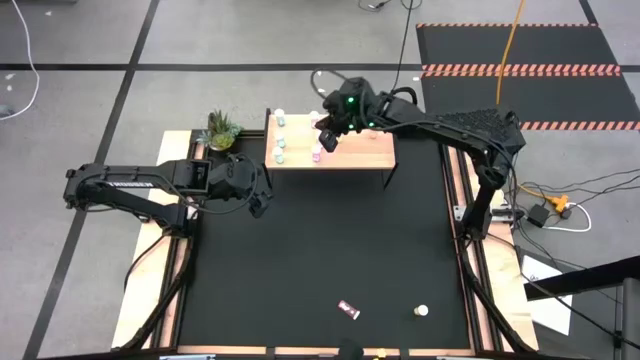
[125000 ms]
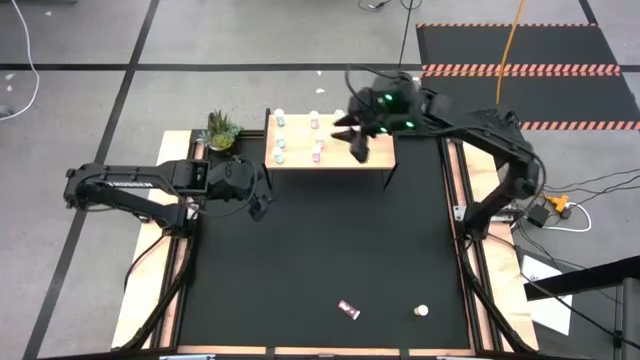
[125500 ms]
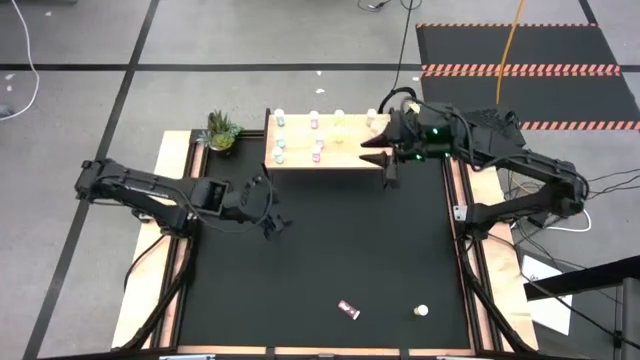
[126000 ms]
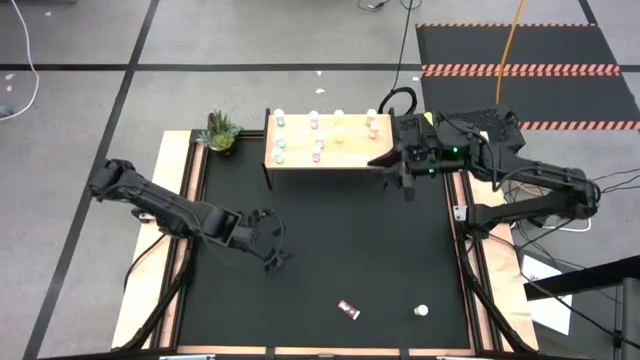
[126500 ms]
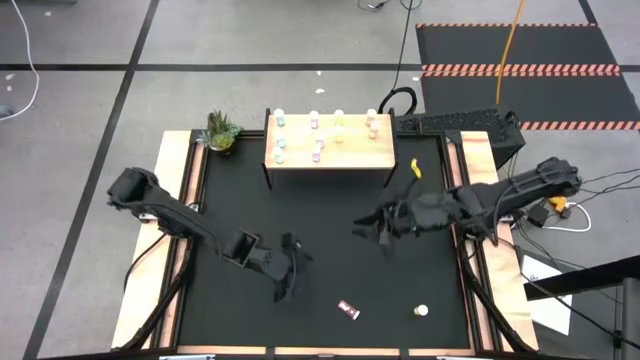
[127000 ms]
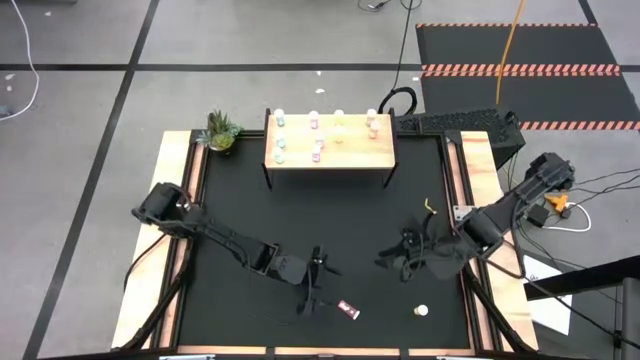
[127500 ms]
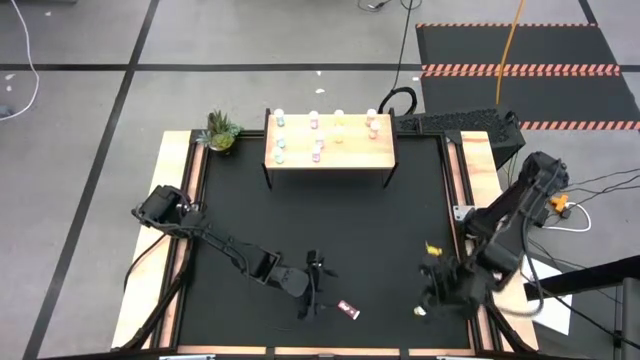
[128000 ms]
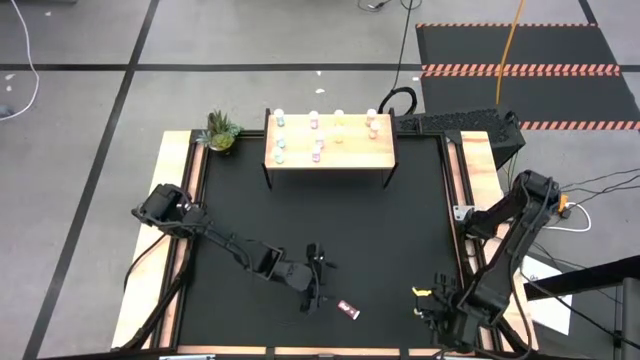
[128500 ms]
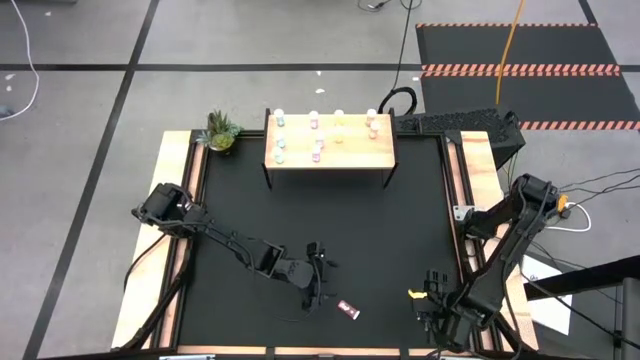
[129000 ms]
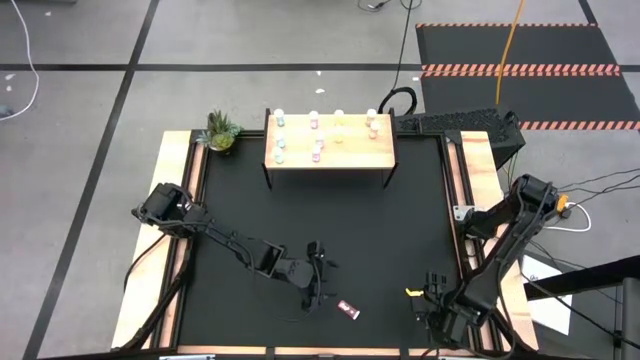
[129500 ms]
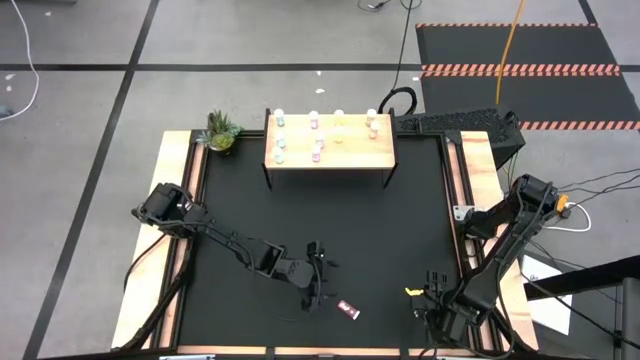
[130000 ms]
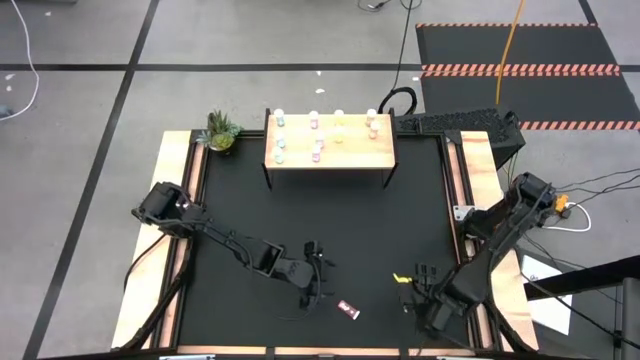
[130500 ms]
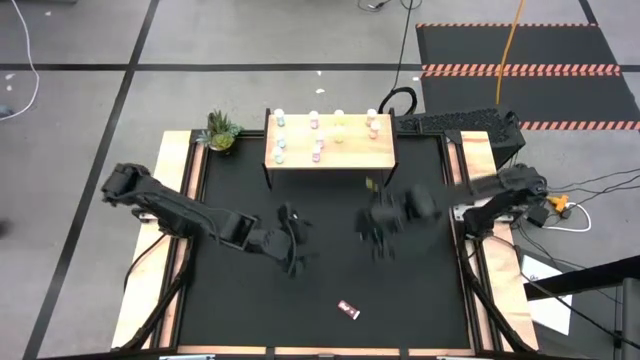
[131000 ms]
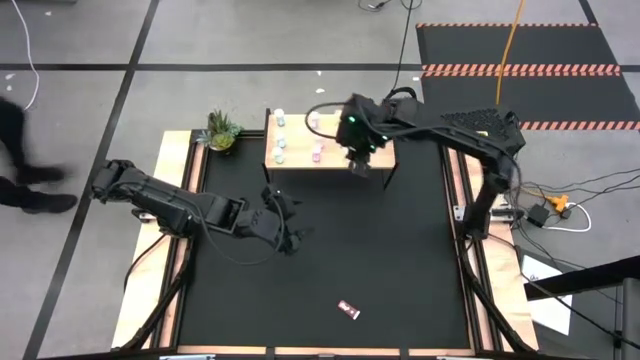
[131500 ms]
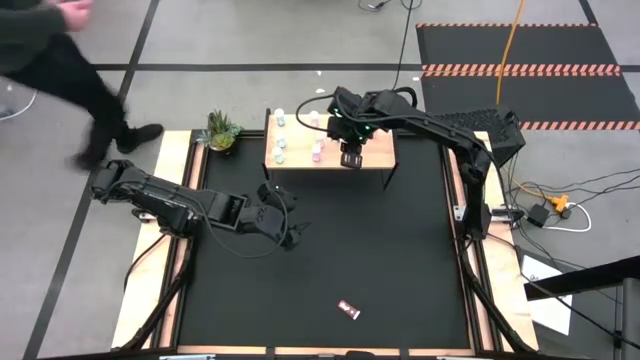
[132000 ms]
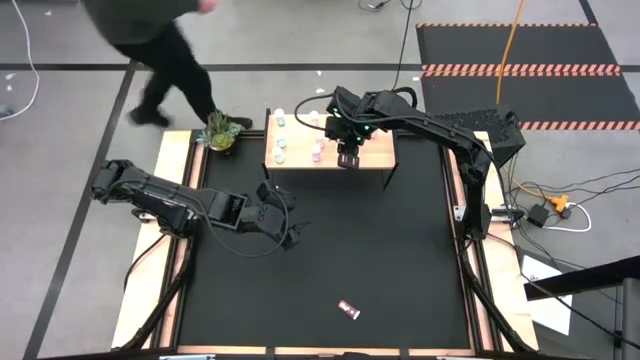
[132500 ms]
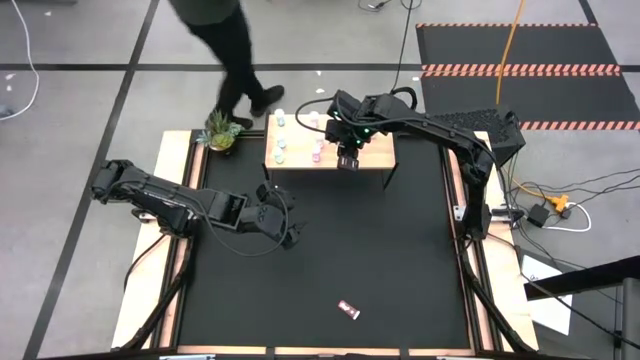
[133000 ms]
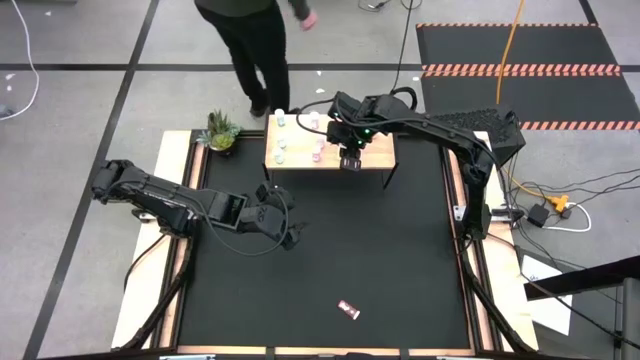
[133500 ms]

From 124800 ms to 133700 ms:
Task: Pick and place medicine bottles onto shelf by color
Put the yellow pill bottle aligned with the other yellow pill bottles on the shelf

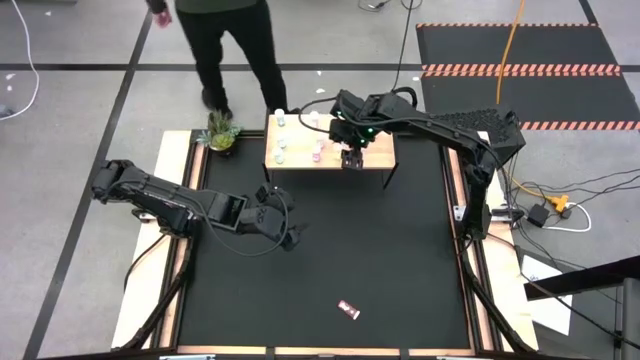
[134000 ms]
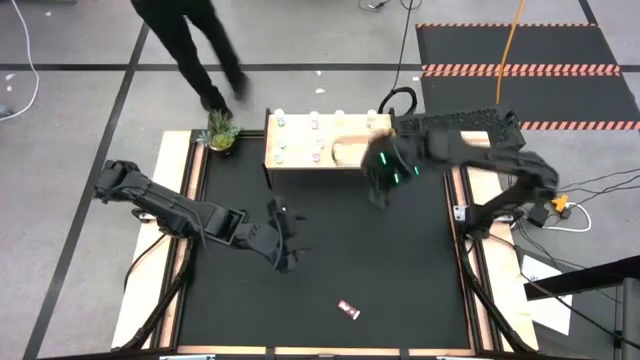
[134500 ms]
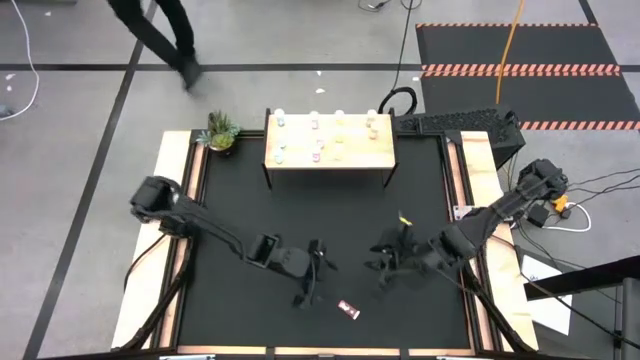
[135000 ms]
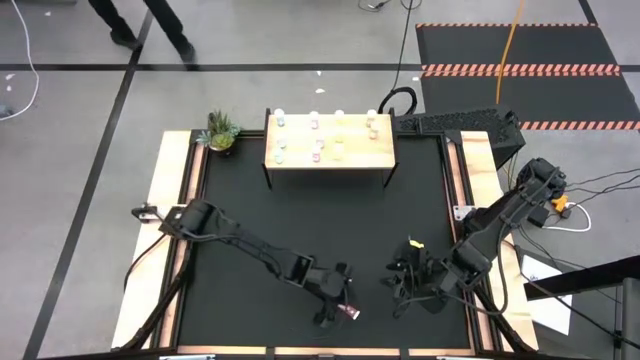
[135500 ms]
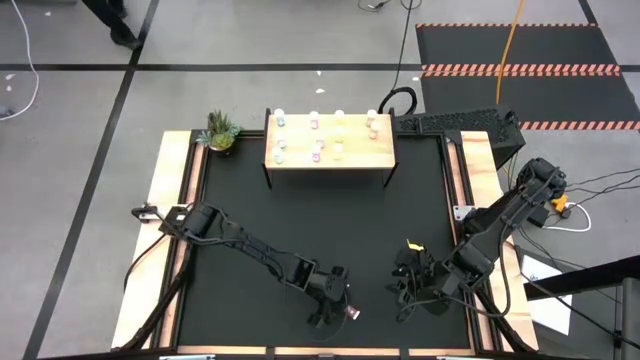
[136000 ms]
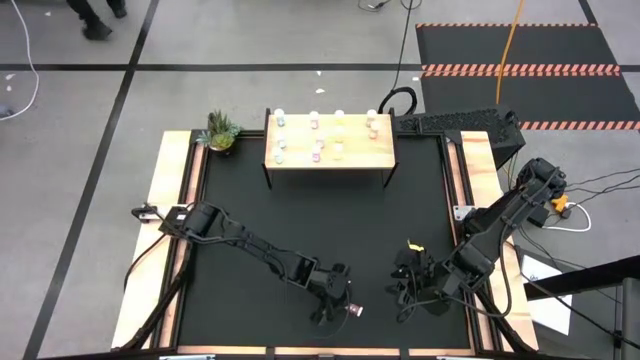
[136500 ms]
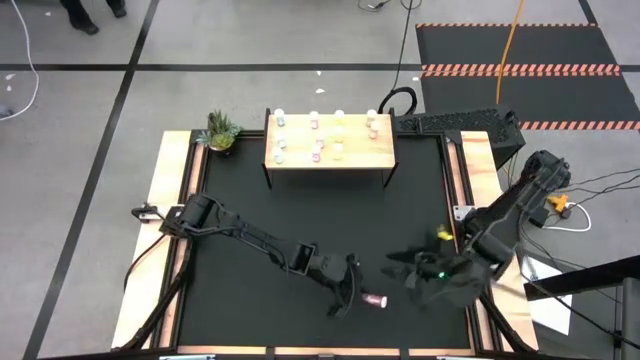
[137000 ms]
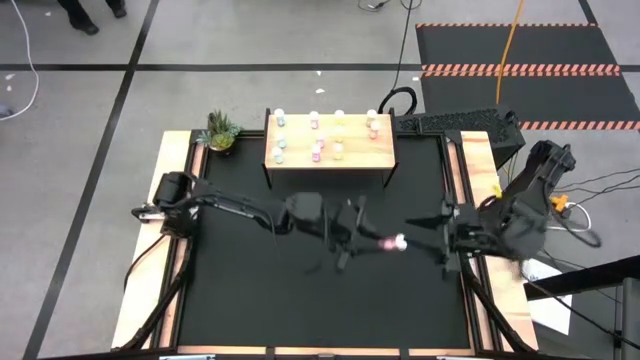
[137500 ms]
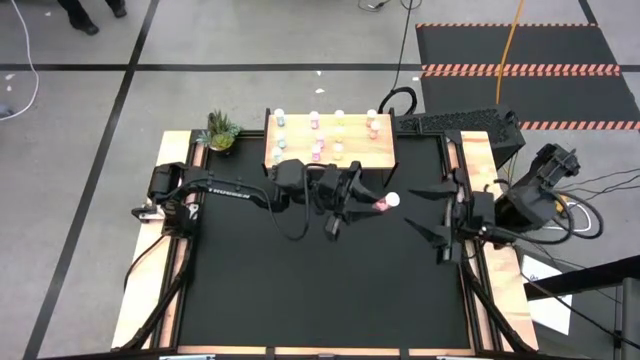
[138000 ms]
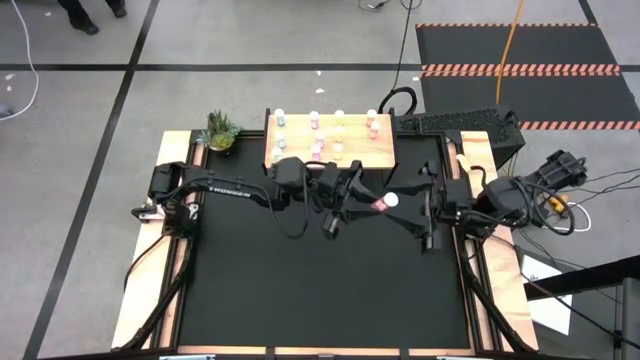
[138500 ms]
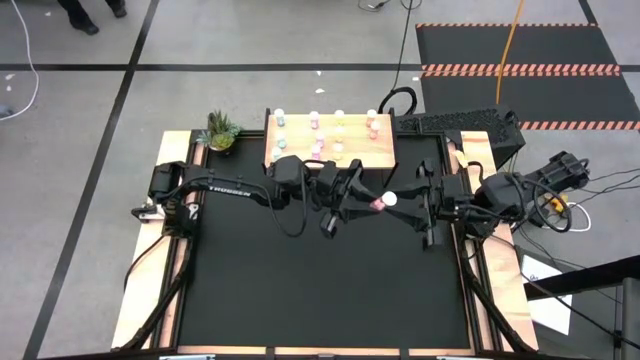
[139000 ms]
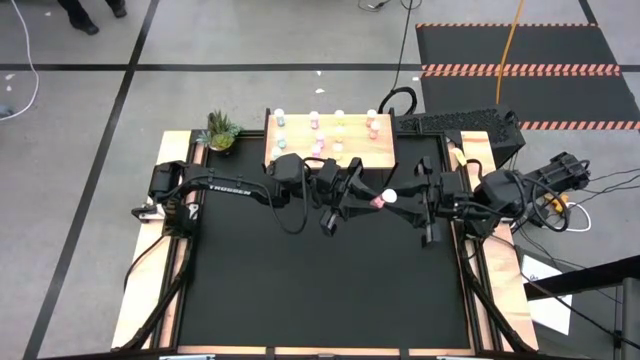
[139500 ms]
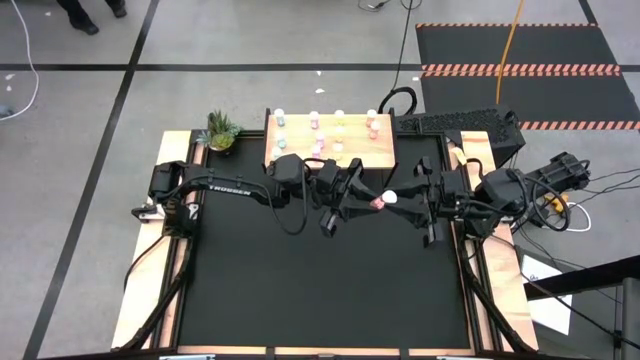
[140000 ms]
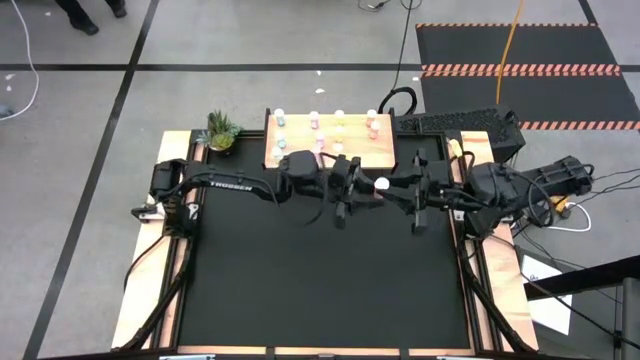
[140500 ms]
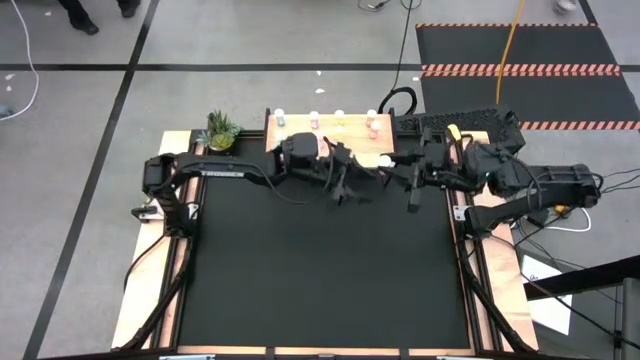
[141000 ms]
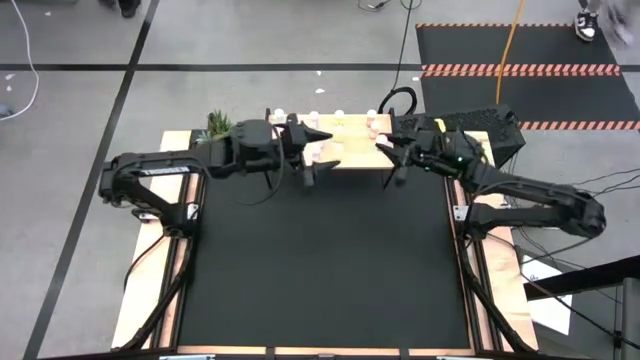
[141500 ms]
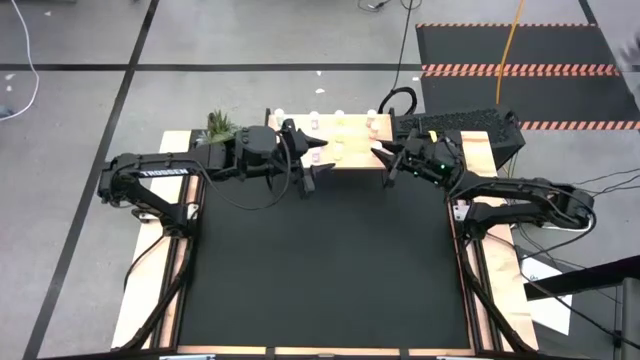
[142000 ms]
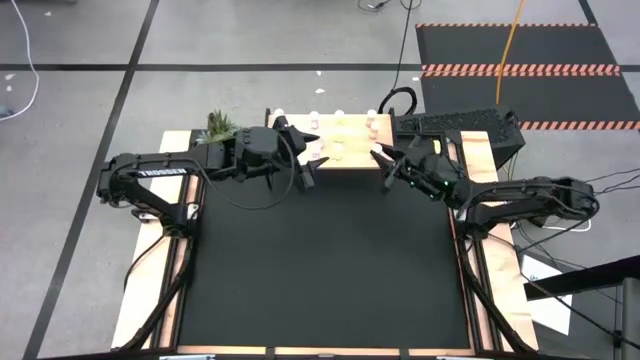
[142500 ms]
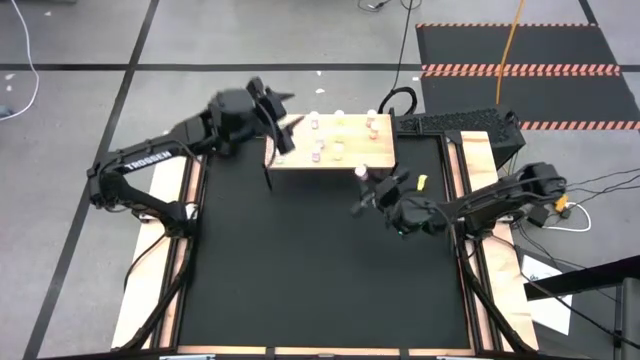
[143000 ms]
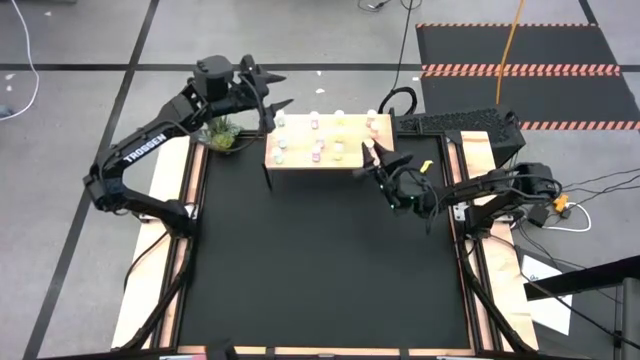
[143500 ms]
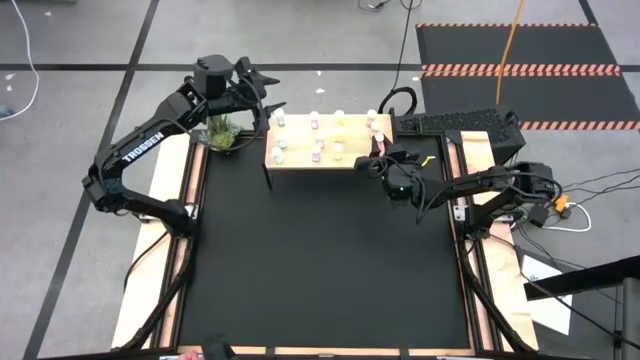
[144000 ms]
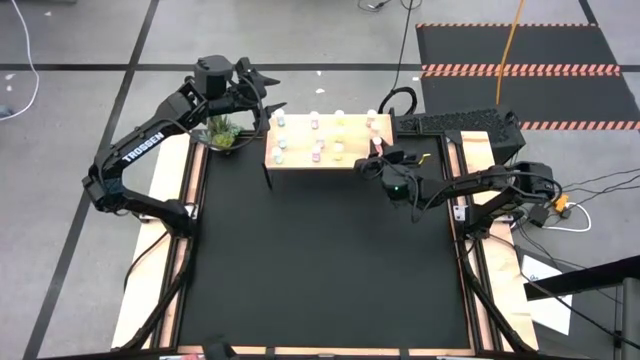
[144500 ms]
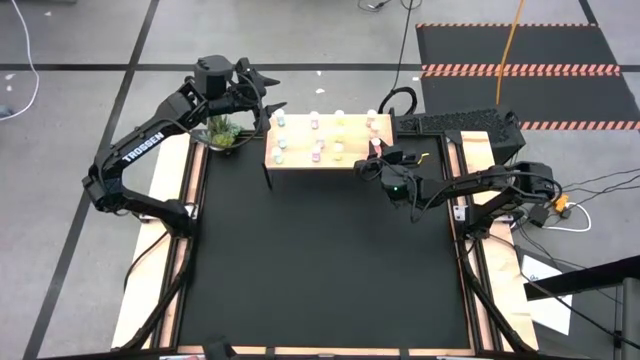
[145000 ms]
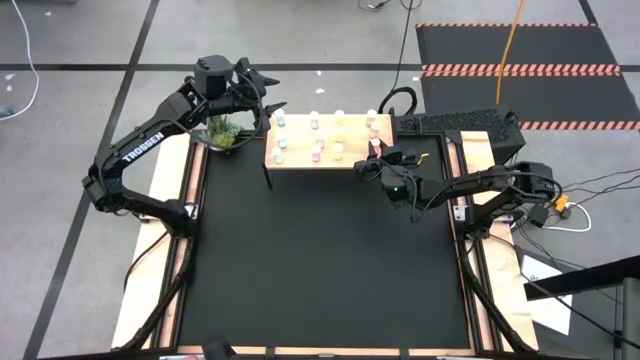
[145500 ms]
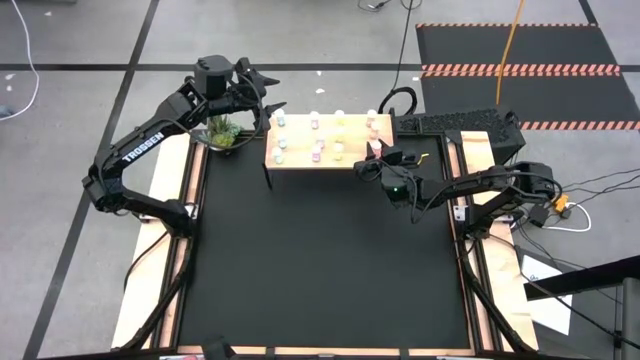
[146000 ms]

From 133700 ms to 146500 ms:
Put the bottom right pink pill bottle aligned with the other pink pill bottles on the shelf
